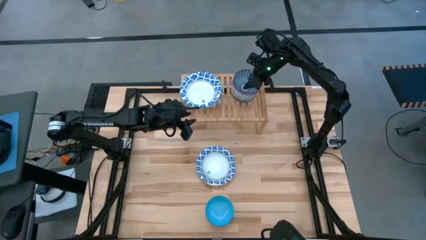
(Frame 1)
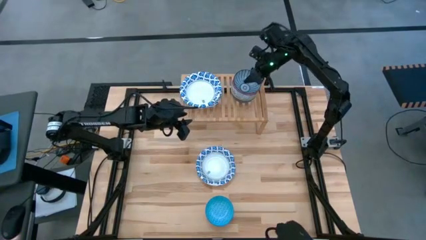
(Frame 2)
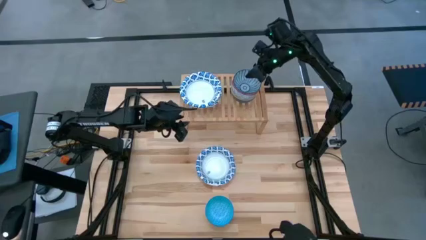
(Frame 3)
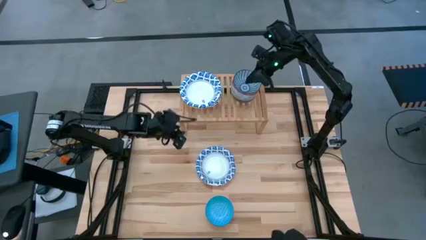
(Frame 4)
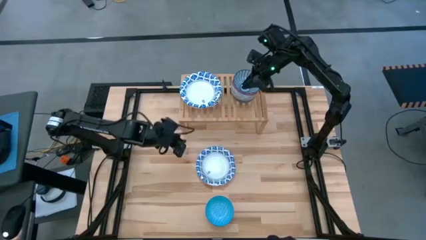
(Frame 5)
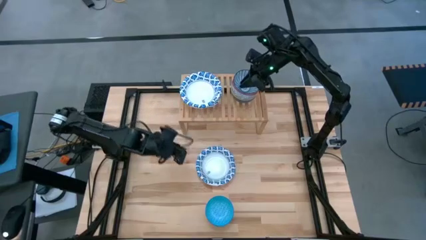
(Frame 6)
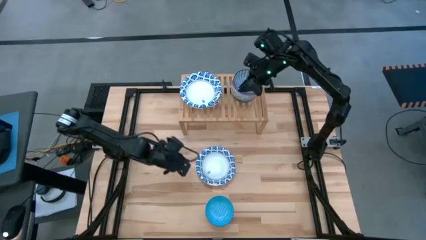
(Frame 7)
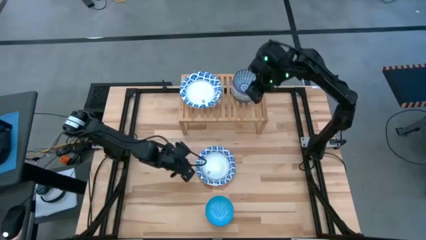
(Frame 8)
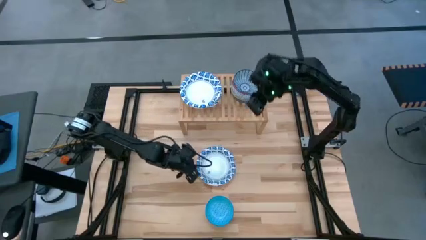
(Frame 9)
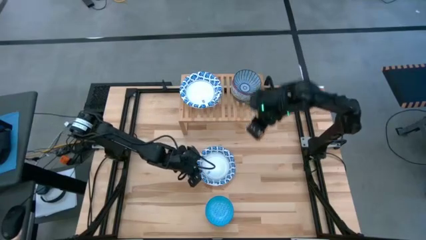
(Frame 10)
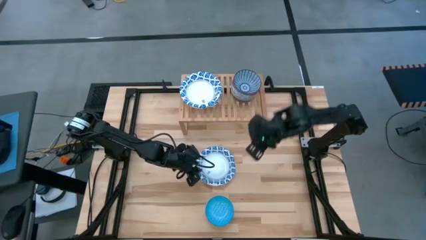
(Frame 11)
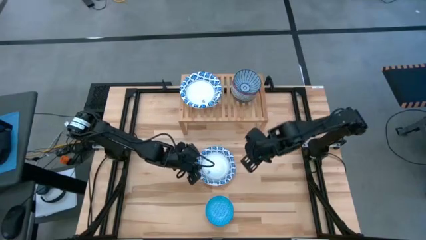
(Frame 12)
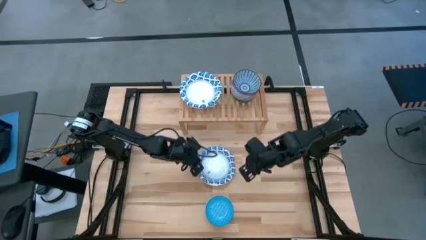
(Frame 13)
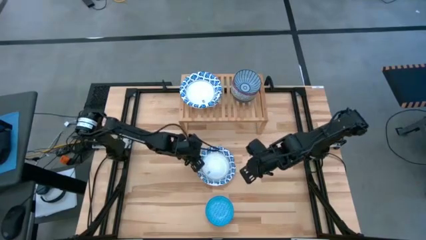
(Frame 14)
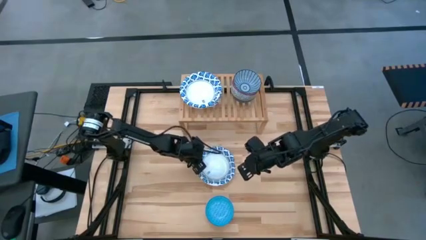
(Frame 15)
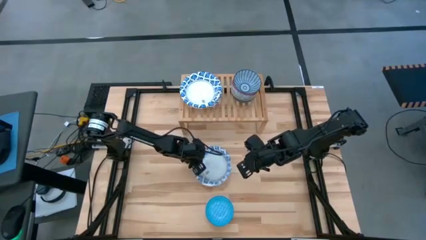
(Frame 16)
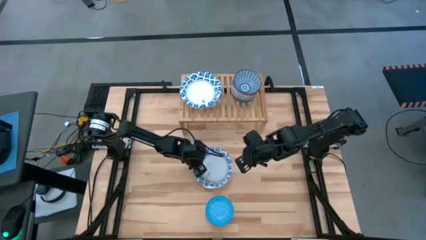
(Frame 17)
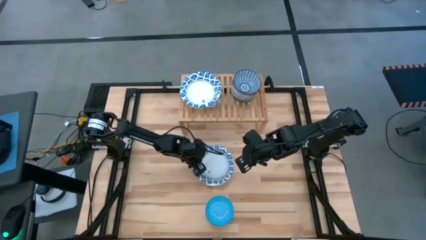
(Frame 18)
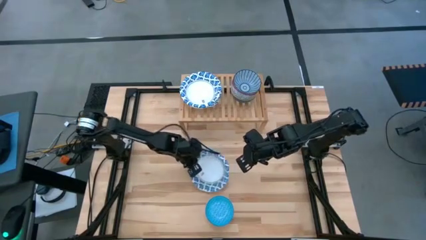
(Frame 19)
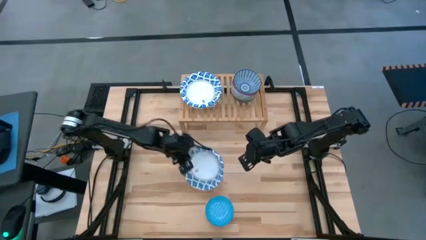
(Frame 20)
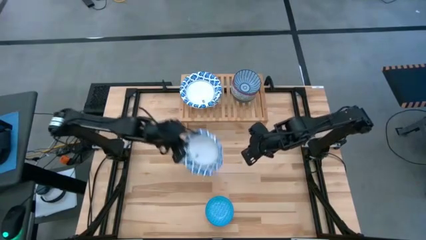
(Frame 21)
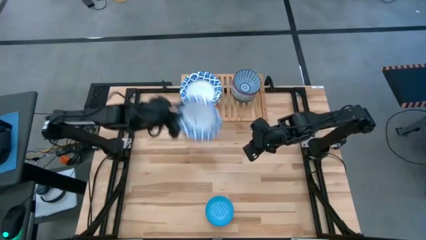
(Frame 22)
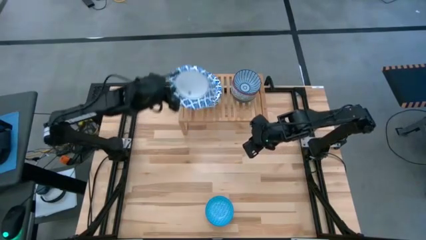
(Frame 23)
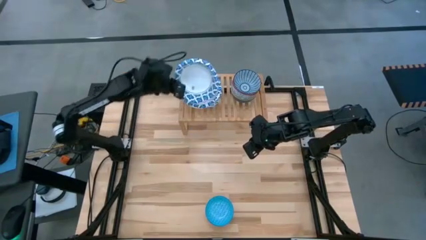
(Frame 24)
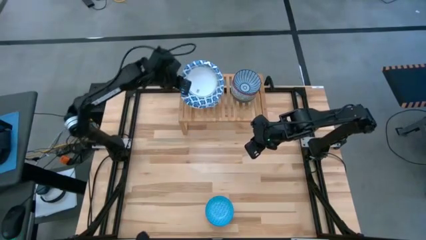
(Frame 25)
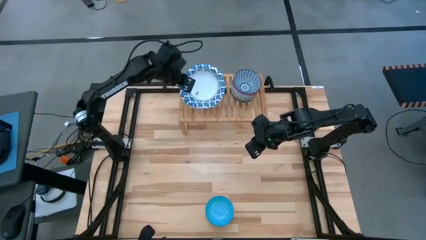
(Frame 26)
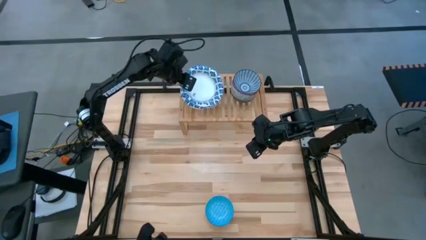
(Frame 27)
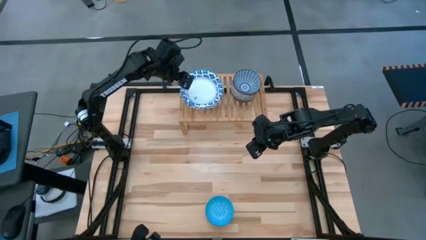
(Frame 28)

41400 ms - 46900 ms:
Task: Place and stack bowls onto a shelf
Stack the white bowl on top of the other white bowl on the shelf

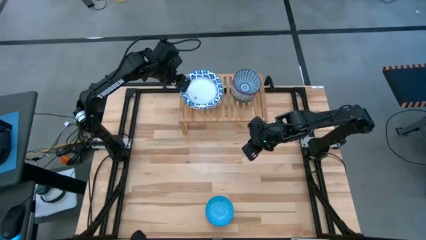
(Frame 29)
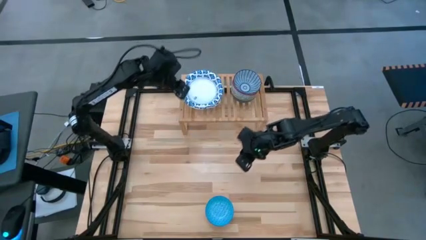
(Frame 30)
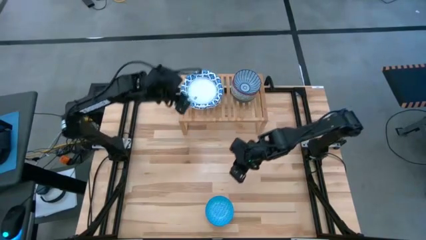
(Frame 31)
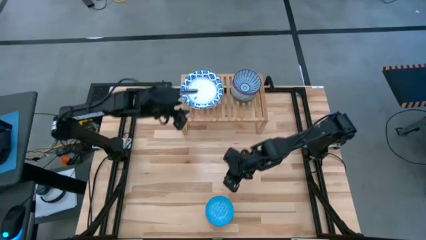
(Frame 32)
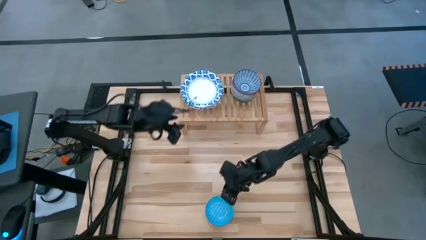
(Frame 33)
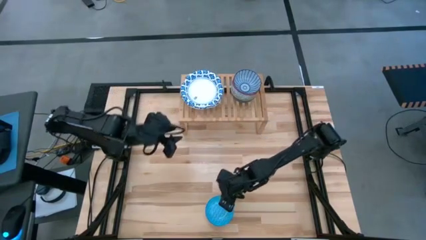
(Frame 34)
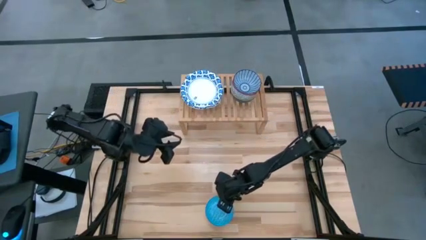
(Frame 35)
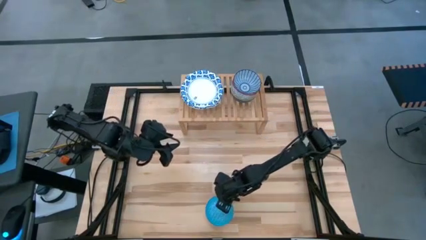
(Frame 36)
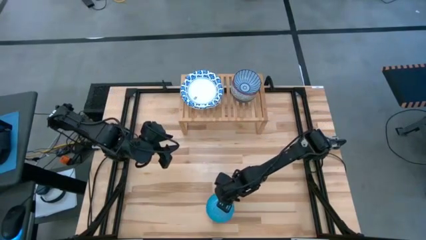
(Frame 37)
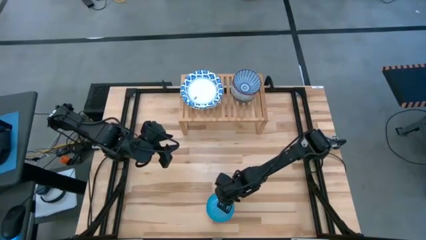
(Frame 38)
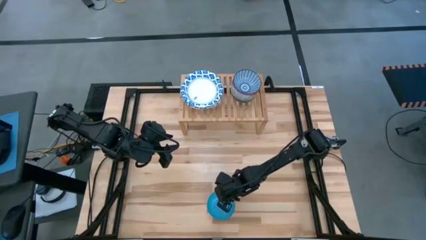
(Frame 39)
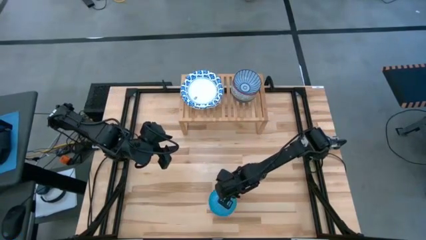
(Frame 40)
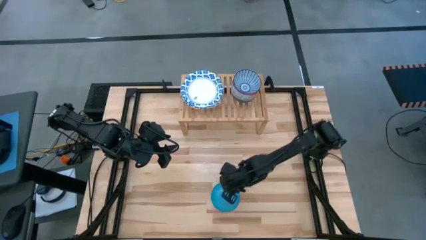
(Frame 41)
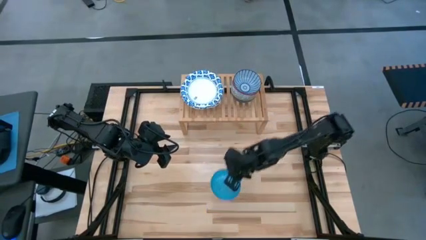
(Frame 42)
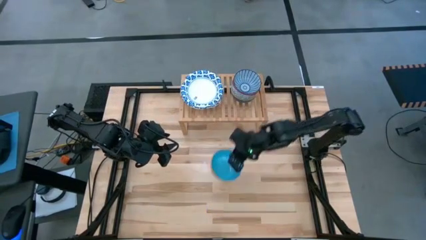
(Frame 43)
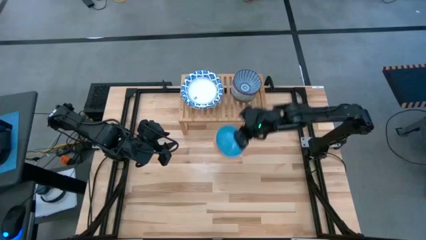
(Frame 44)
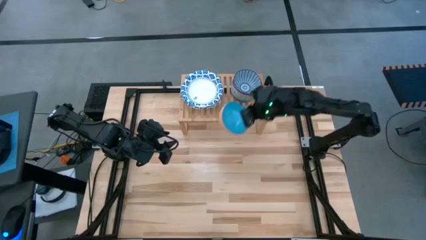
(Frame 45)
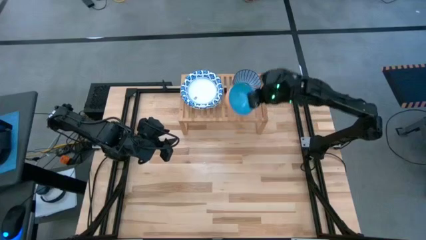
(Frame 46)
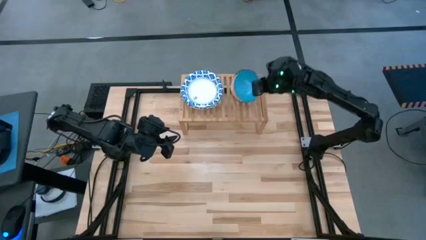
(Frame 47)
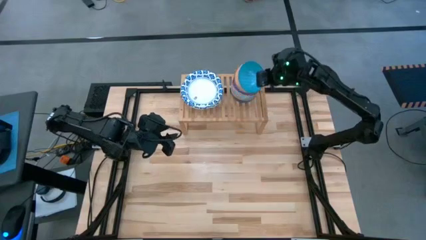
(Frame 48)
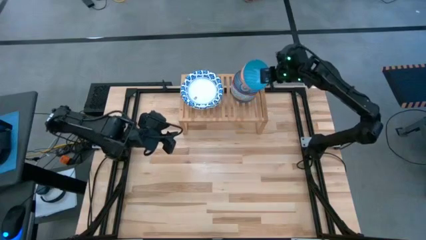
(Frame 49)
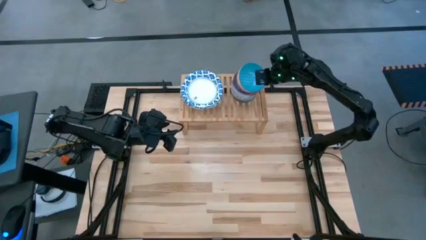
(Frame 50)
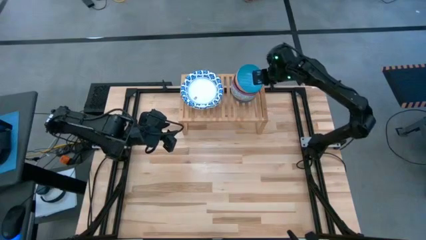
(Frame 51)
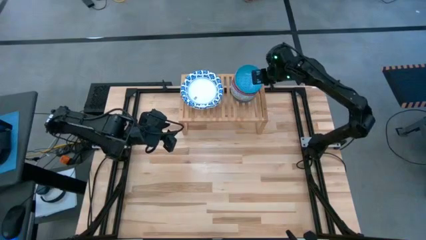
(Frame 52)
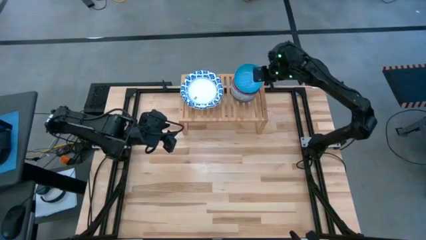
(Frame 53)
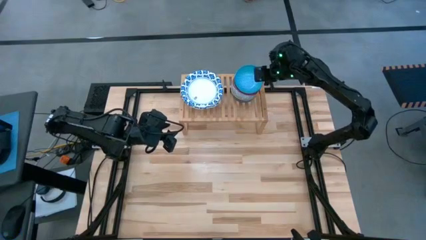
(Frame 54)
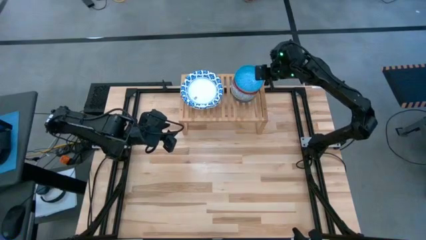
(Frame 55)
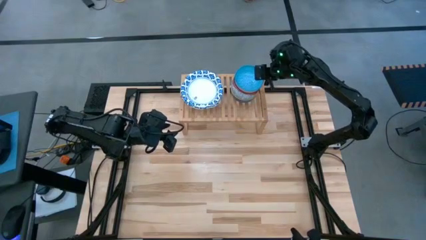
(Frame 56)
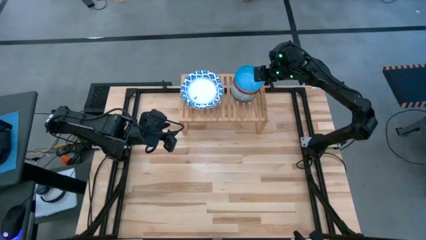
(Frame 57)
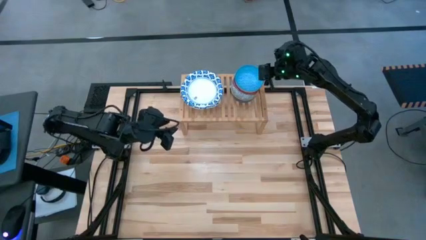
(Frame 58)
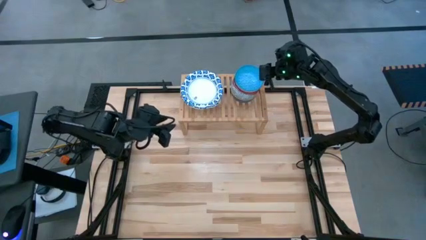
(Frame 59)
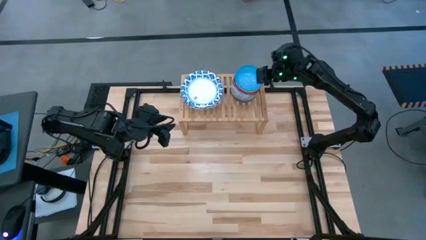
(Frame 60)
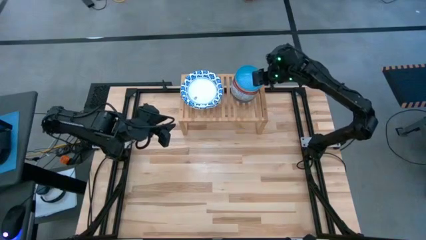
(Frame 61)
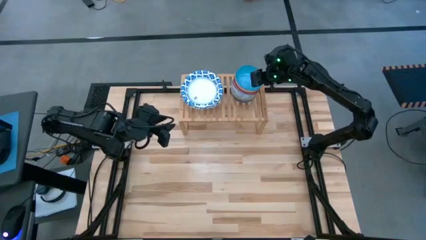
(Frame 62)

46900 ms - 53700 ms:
Stack the light blue on the top of the blue bowl on the shelf

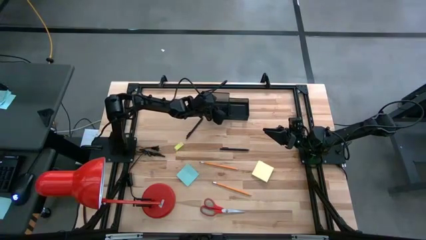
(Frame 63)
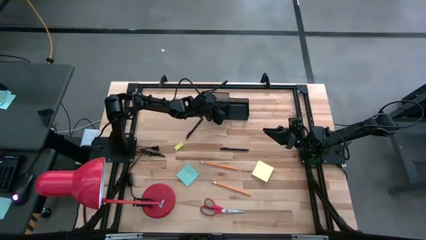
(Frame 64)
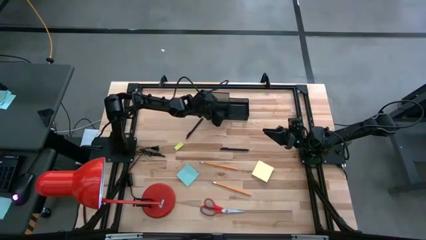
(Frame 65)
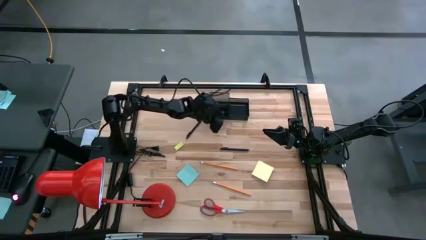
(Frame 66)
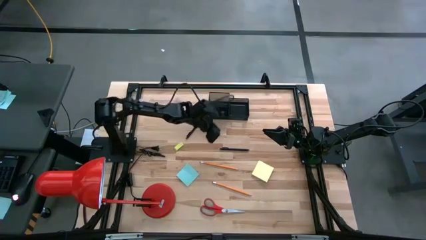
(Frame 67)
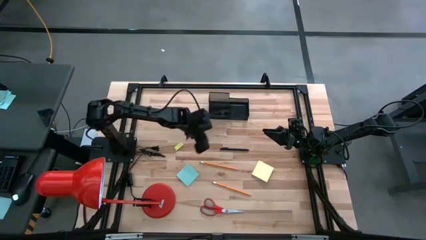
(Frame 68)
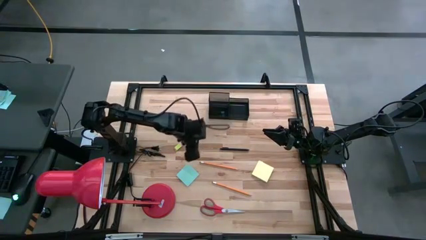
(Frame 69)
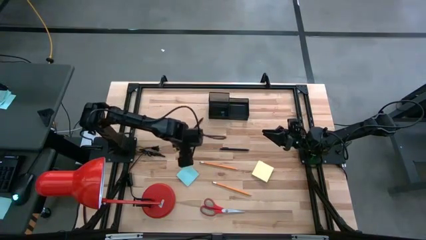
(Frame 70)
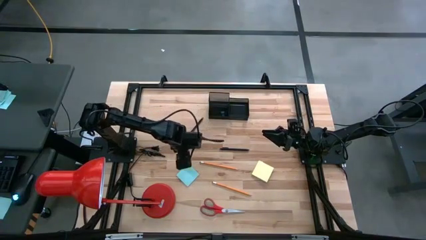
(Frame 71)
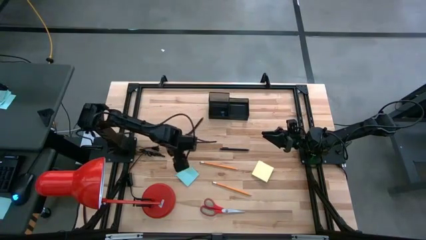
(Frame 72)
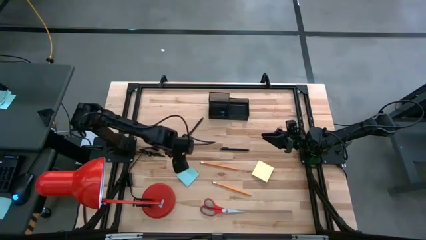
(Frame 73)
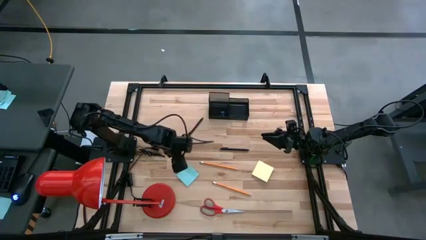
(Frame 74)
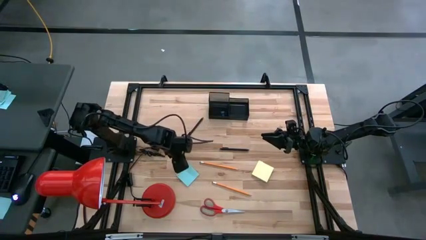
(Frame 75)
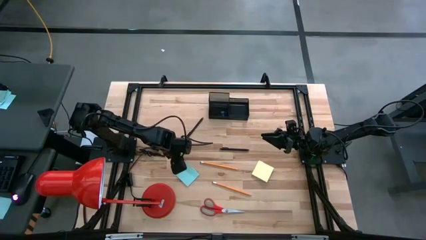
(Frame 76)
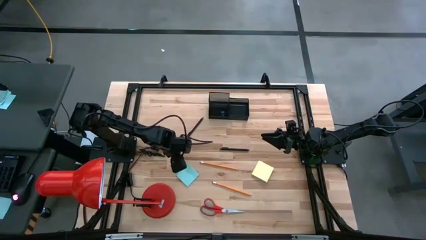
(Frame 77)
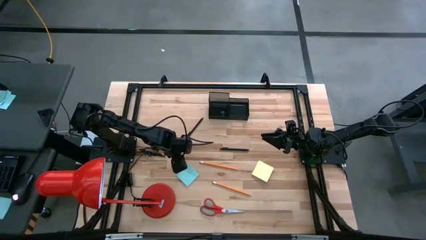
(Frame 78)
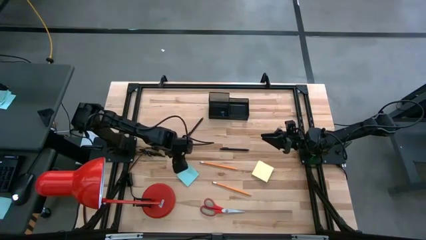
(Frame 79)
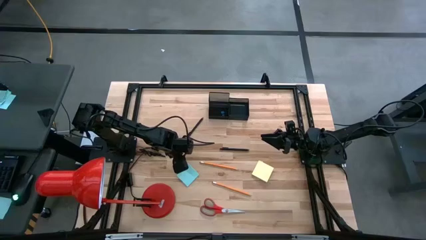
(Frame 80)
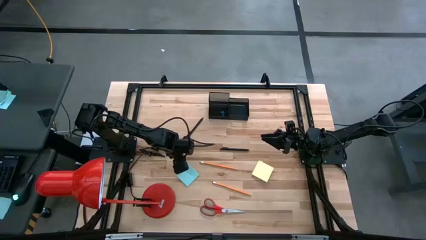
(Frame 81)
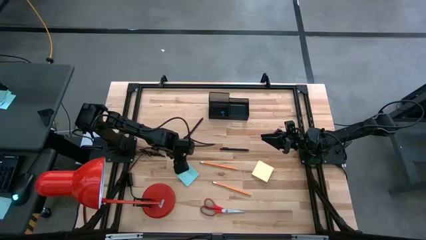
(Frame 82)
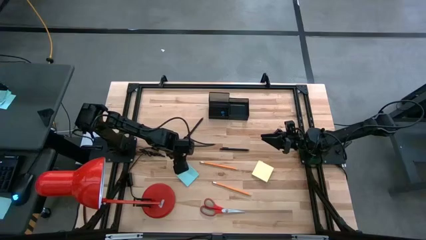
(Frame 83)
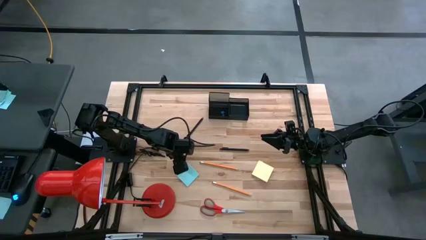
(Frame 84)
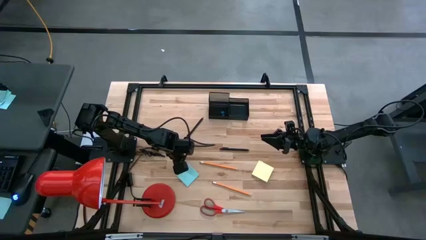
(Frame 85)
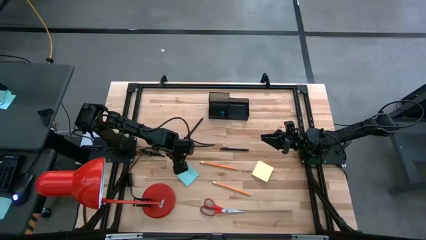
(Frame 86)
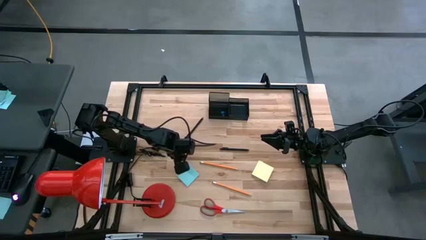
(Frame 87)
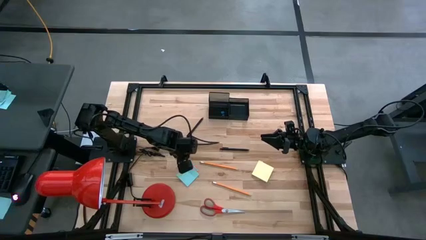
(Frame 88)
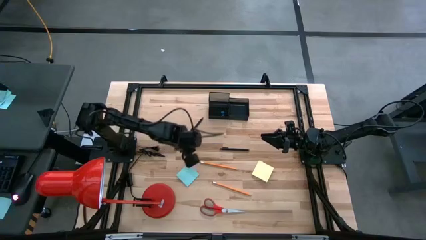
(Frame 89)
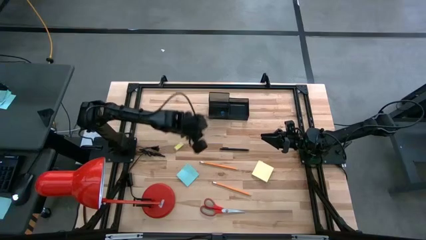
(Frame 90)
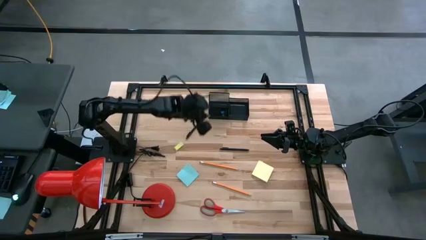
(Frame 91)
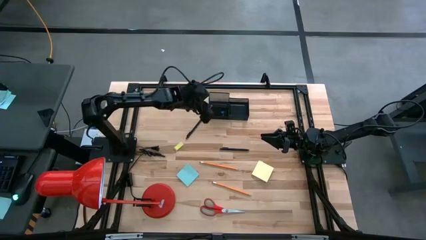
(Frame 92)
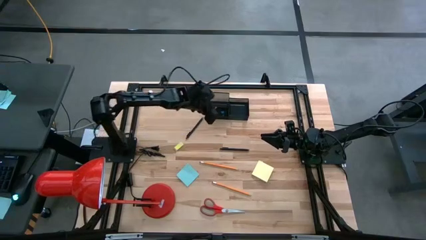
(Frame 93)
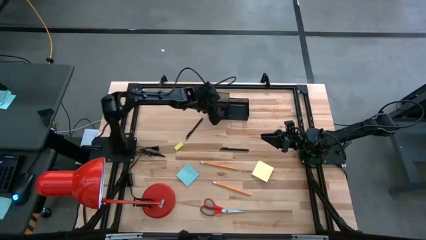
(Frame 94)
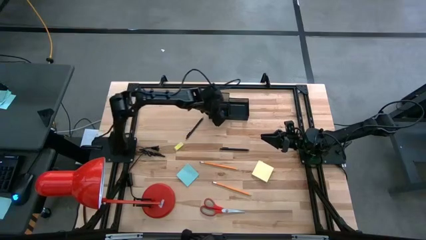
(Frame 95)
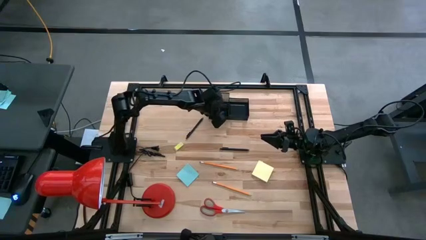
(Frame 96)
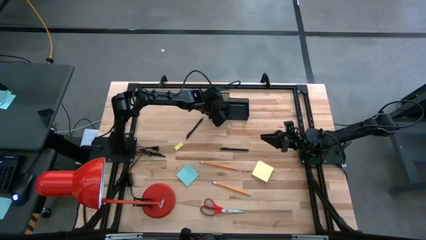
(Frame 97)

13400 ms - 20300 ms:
Task: Pick and place office supplies into organizer
Put the pink binder clip in the black desk organizer
